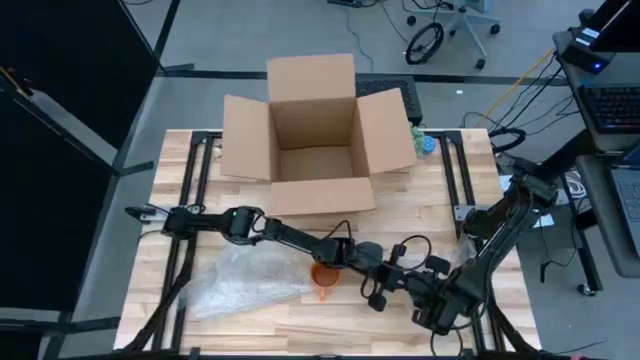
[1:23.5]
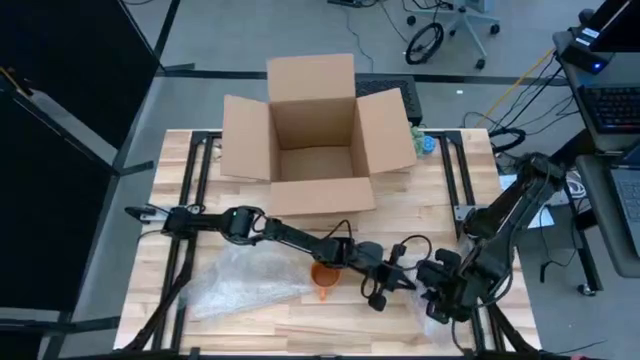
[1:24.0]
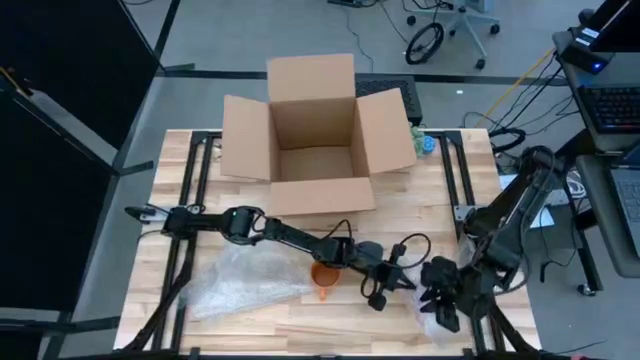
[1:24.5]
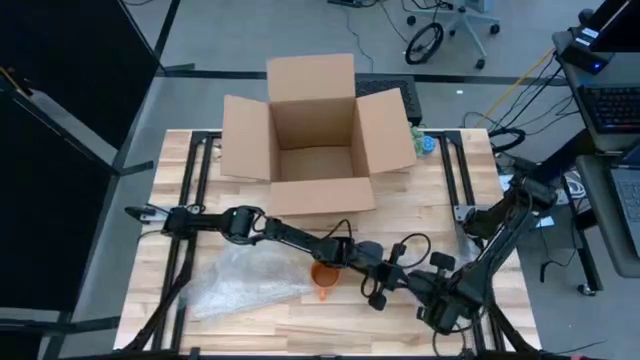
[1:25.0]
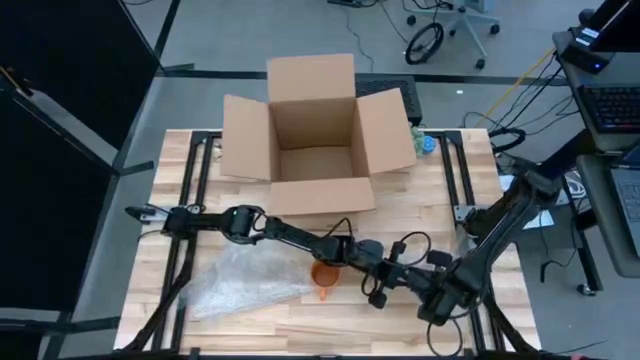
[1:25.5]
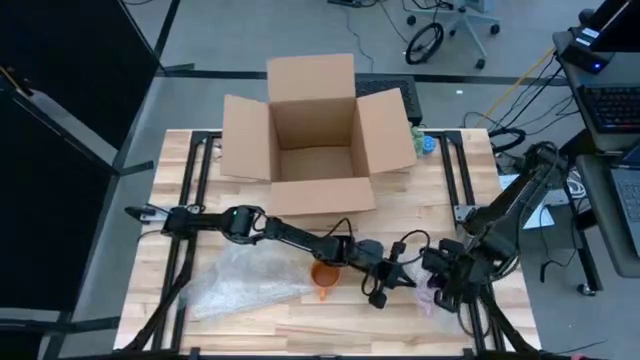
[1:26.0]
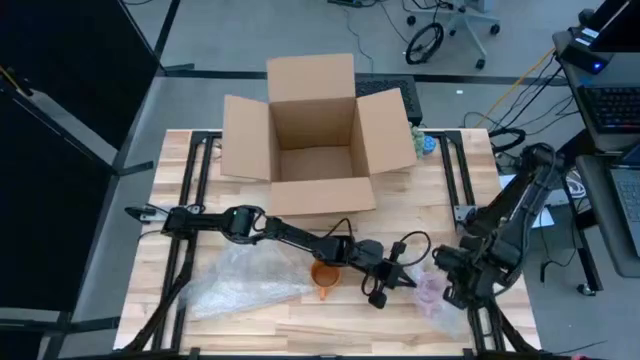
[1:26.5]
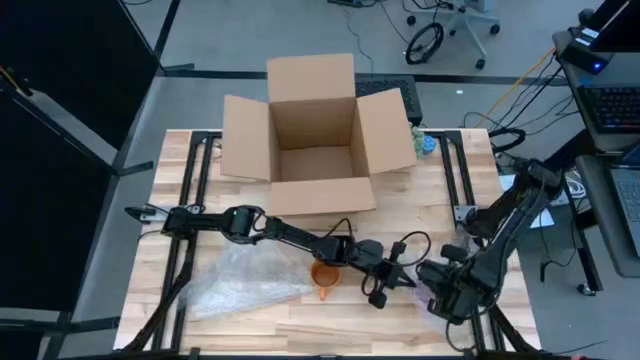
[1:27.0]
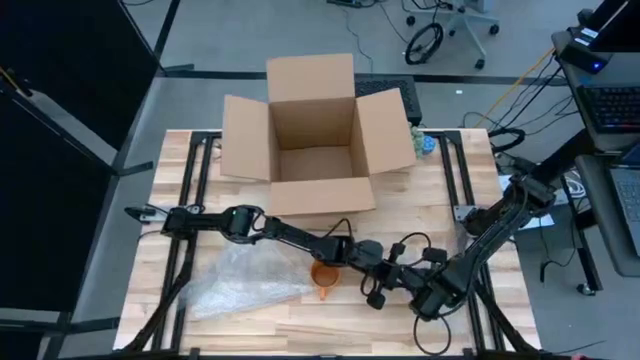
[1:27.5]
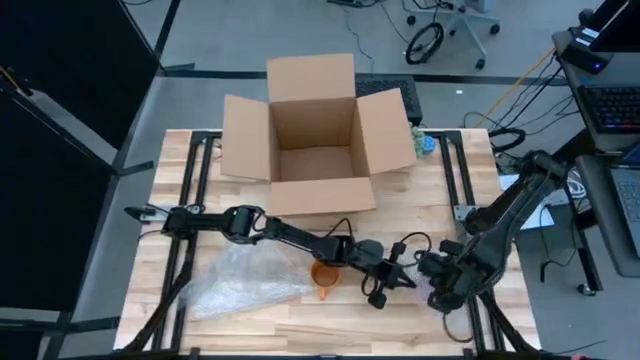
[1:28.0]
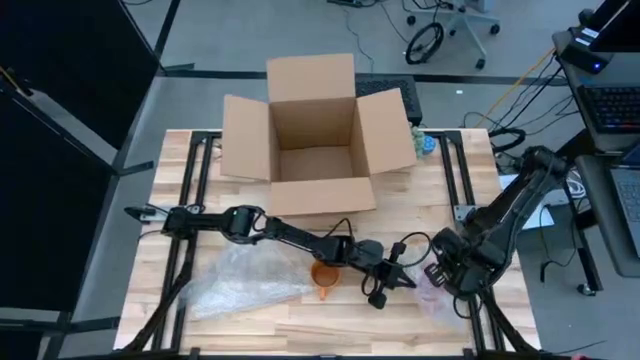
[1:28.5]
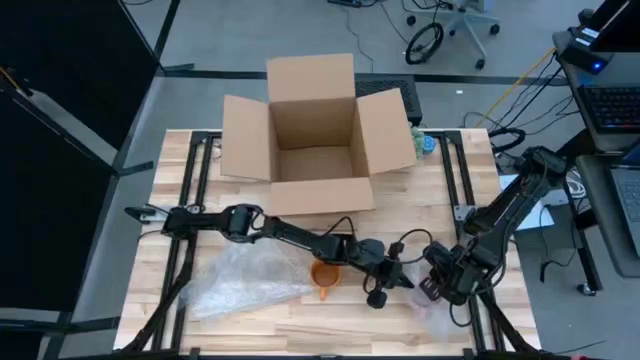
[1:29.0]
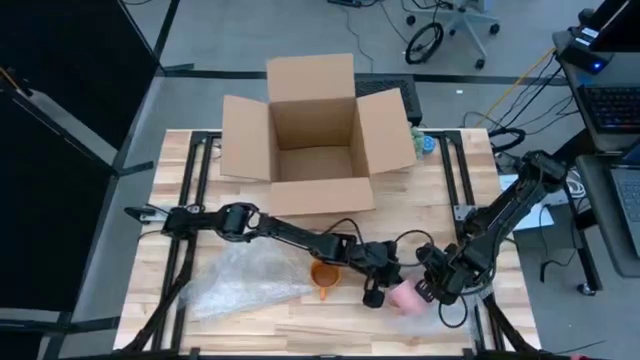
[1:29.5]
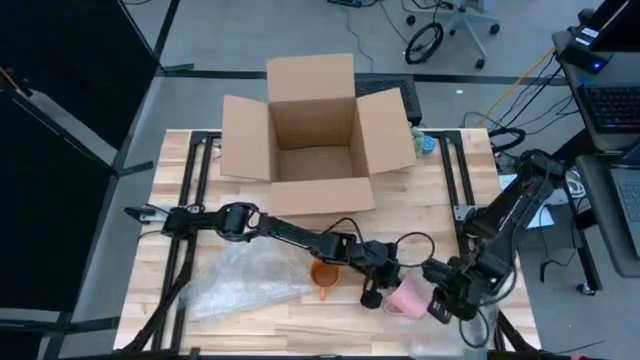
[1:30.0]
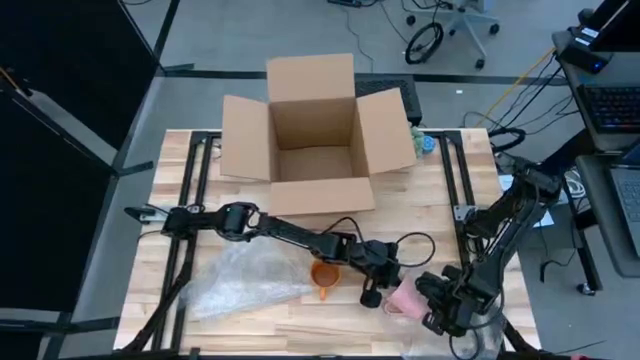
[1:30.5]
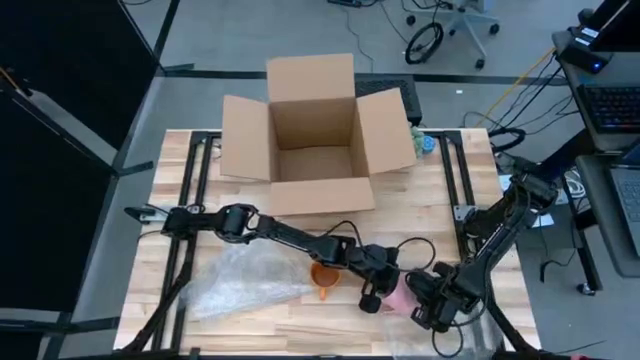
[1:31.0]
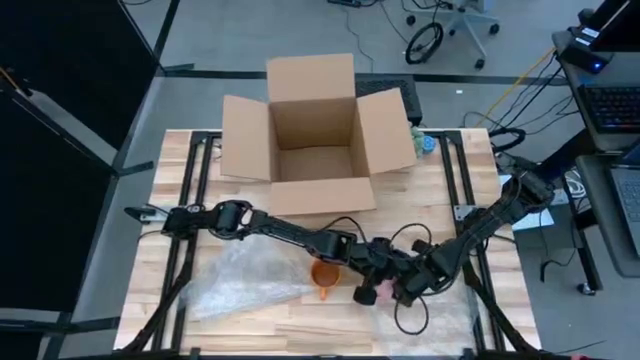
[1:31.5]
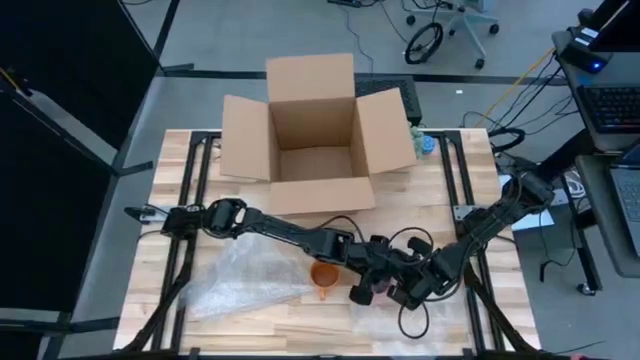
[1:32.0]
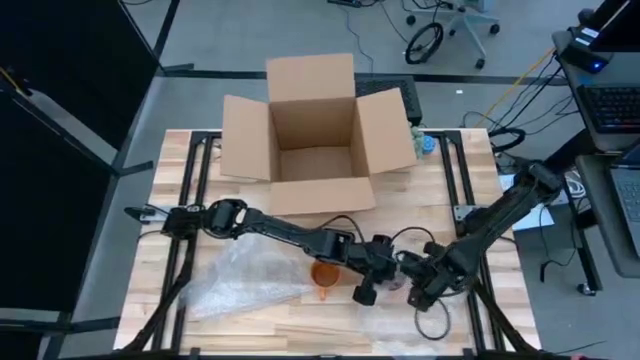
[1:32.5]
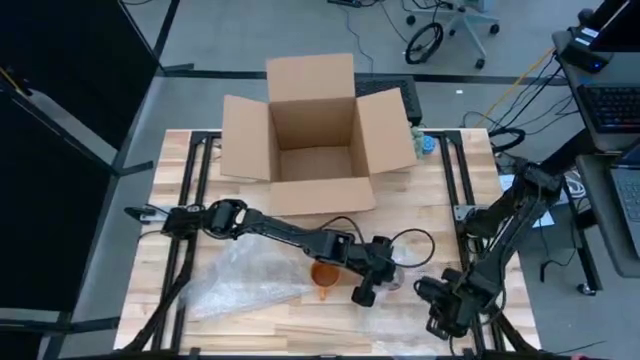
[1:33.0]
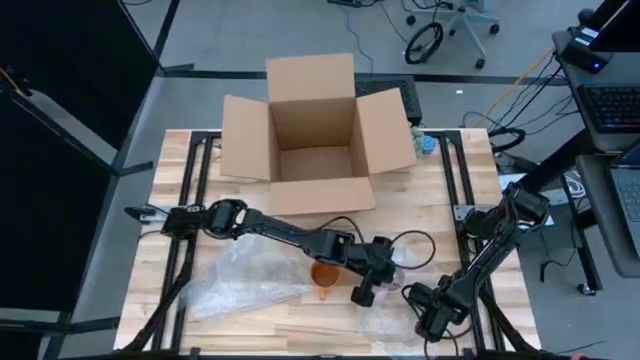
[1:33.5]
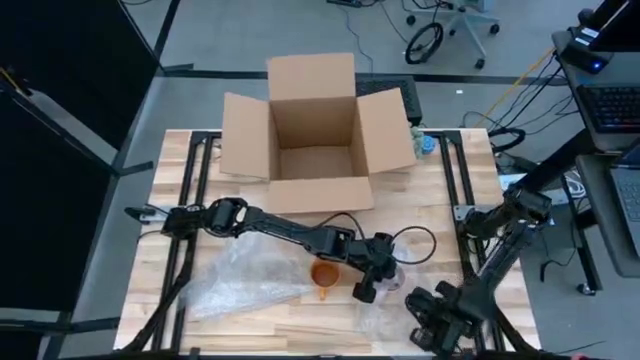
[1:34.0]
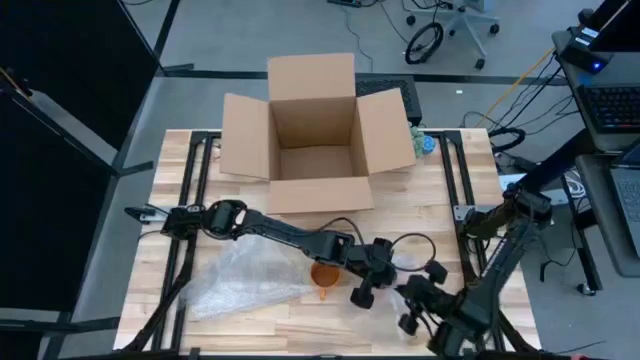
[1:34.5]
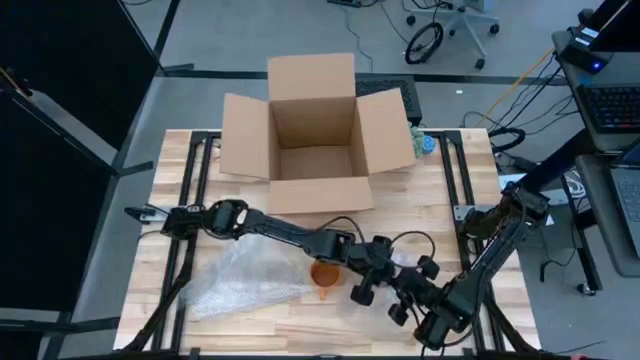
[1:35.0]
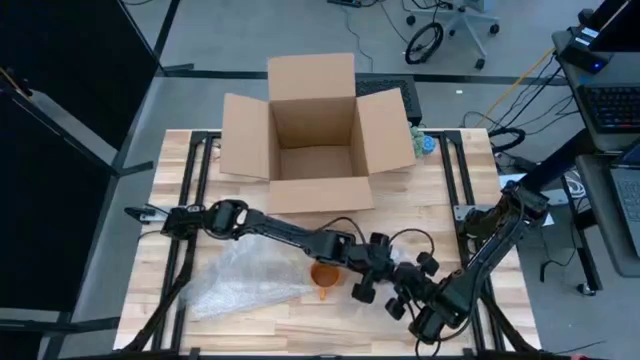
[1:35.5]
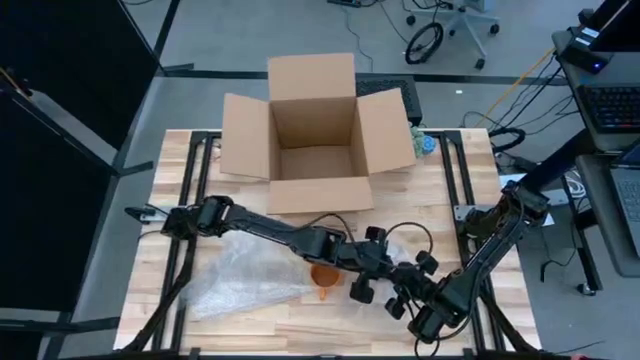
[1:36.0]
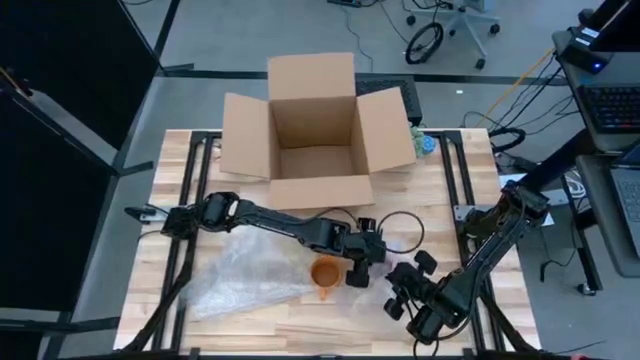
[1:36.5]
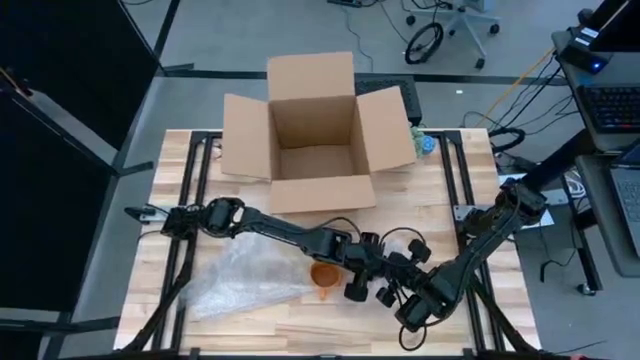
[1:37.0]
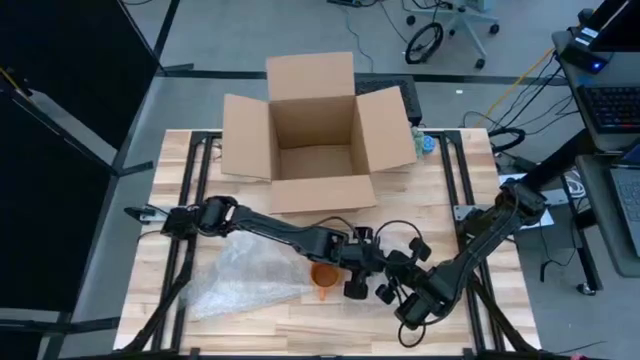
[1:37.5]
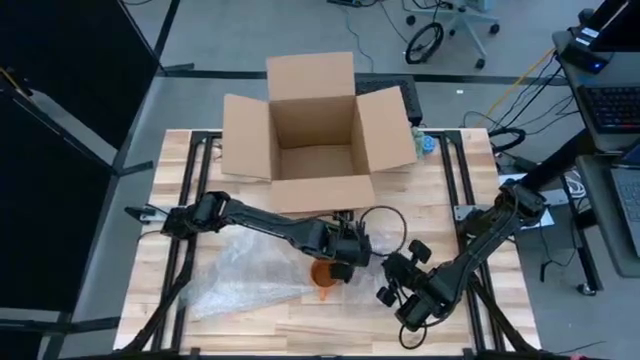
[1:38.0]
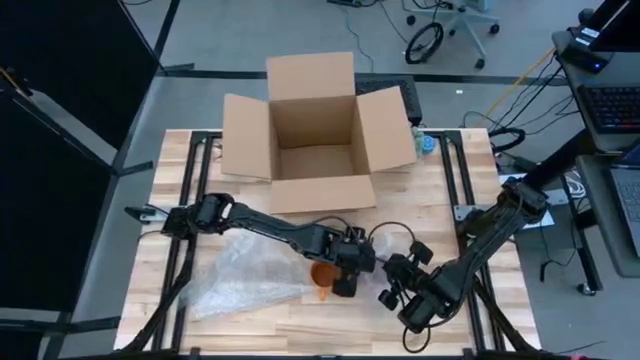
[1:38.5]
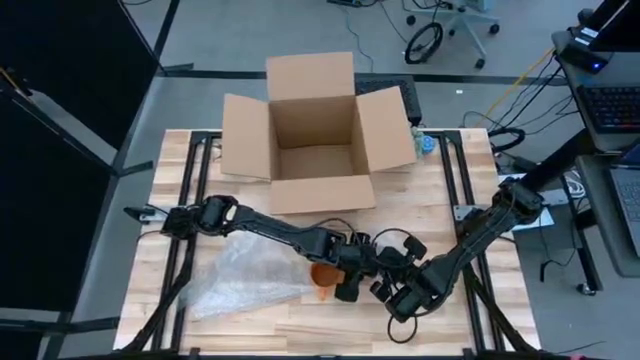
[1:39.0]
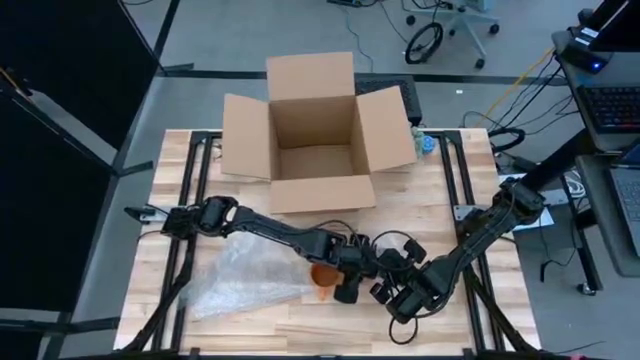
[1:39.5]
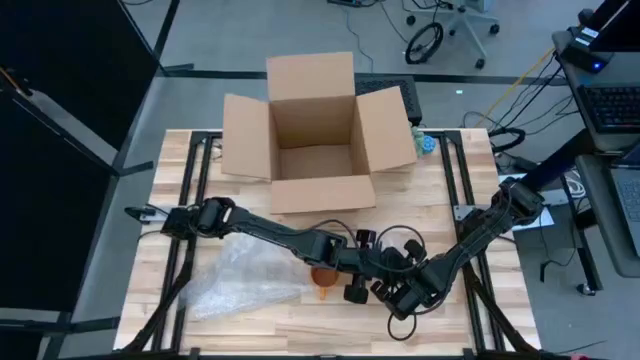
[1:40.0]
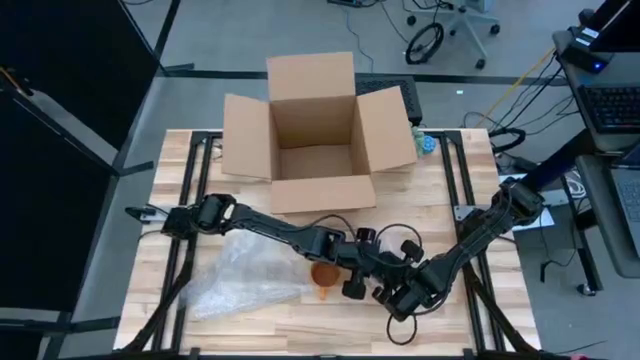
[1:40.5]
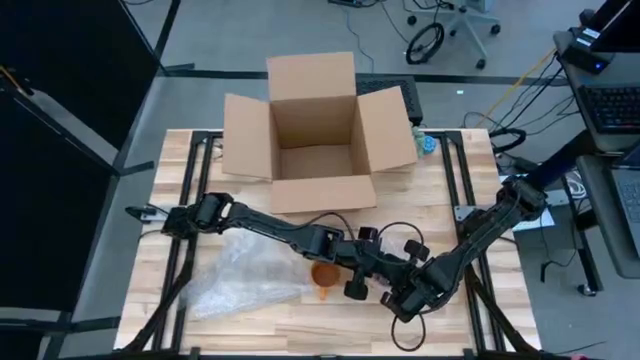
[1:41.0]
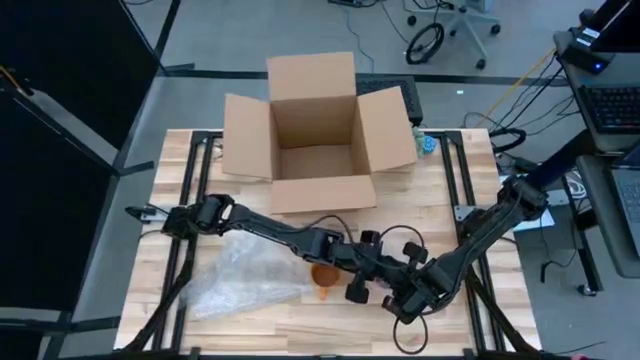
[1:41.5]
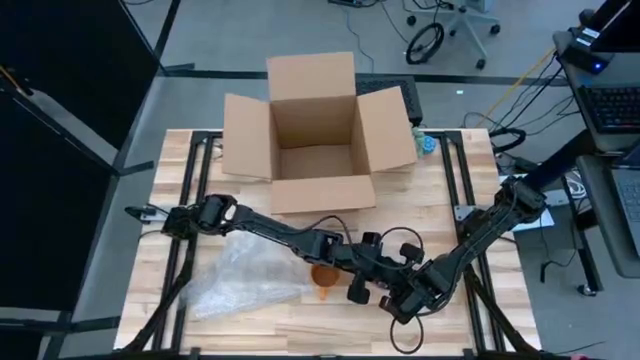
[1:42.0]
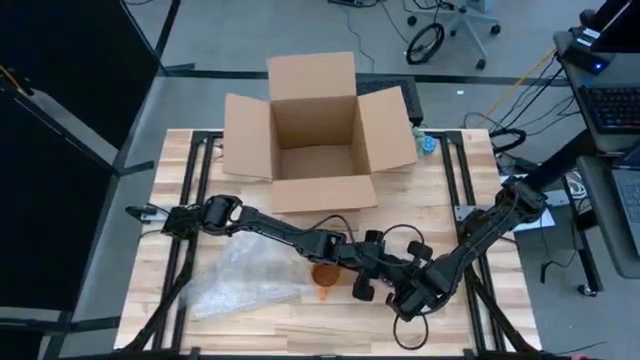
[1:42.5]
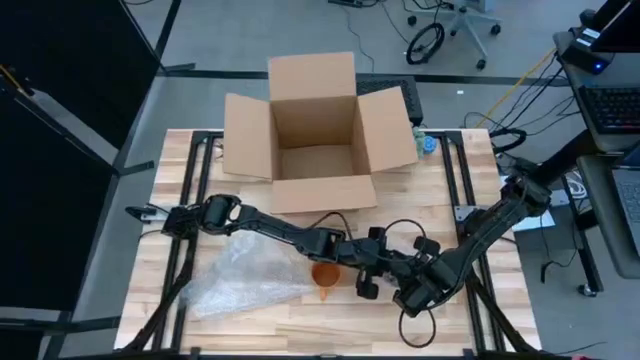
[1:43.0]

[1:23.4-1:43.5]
Task: wrap mug
Wrap the pink mug with the transparent bubble wrap

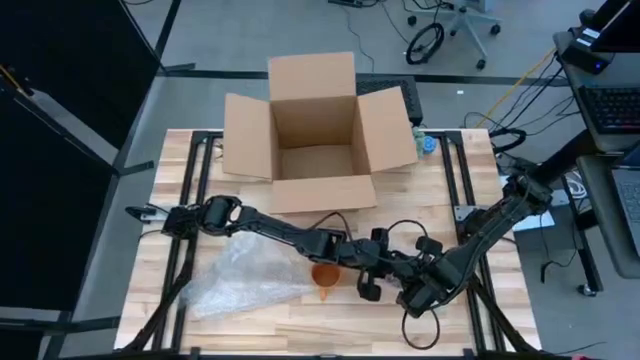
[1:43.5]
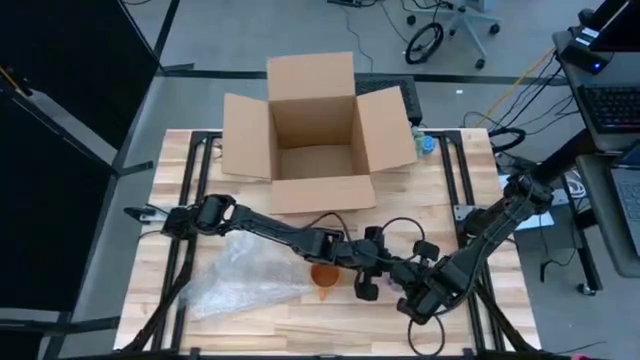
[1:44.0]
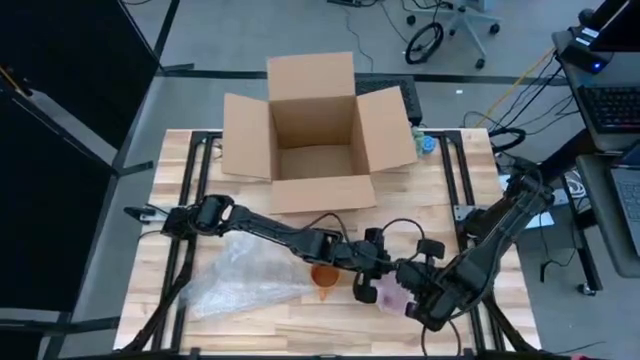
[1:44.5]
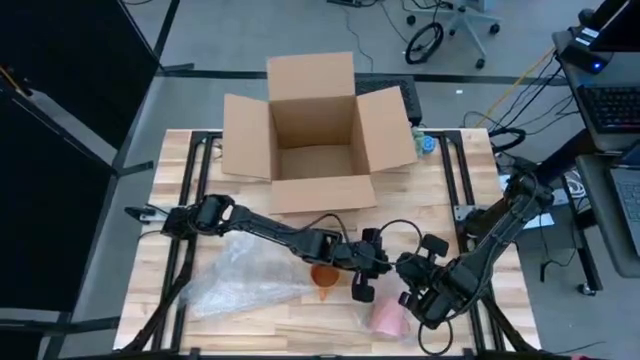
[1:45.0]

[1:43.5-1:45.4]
Wrap the pink mug with the transparent bubble wrap
